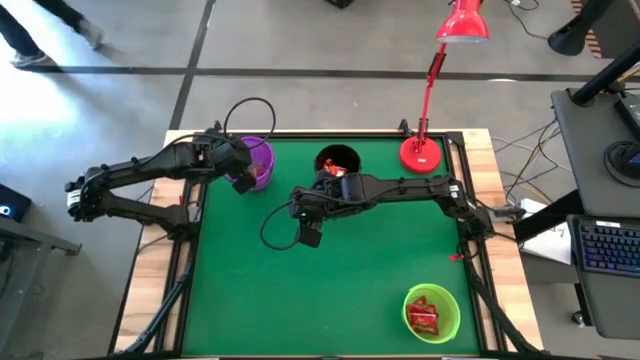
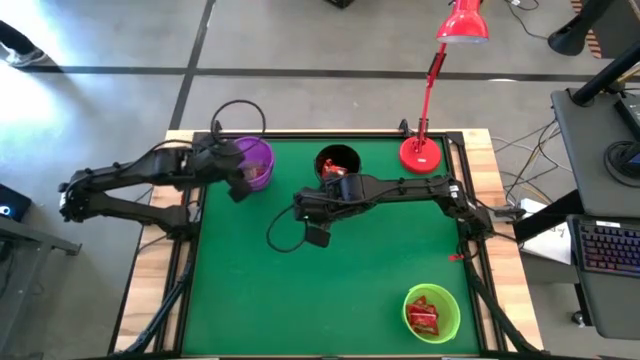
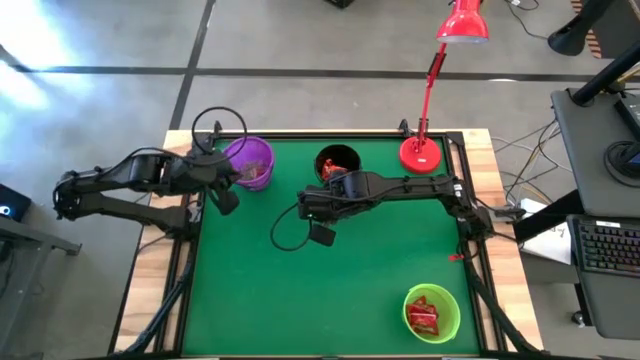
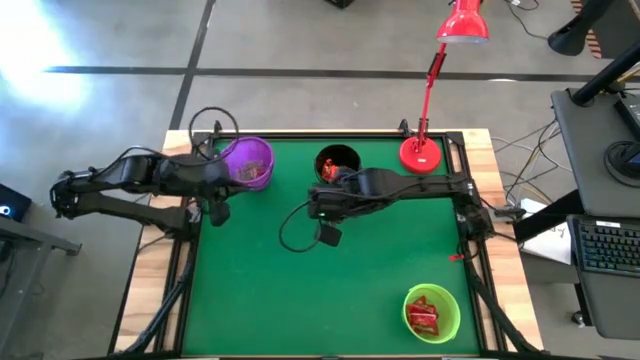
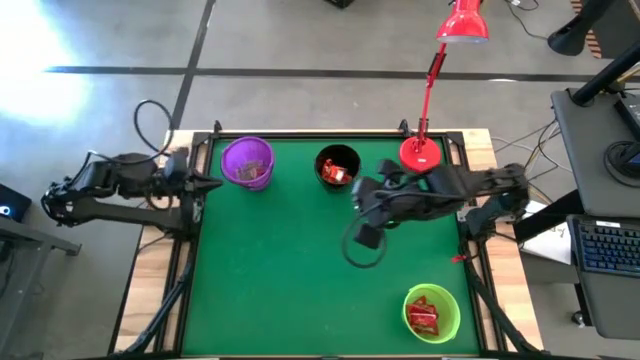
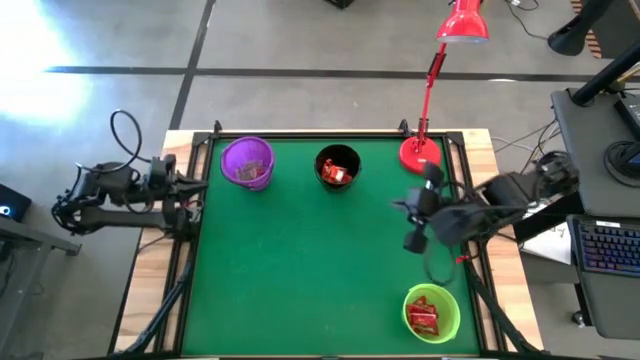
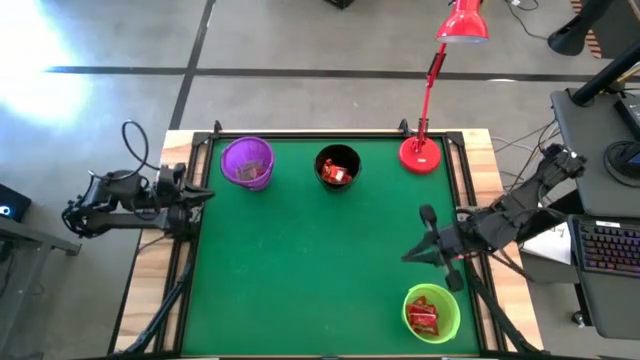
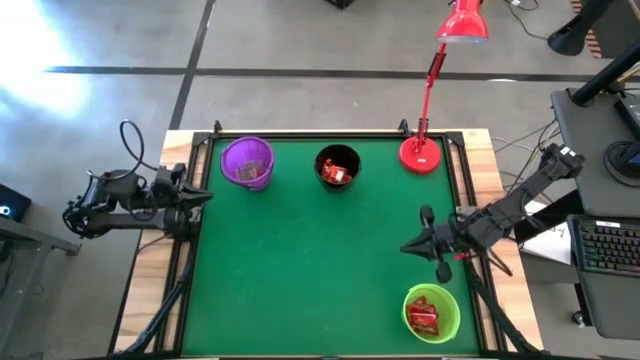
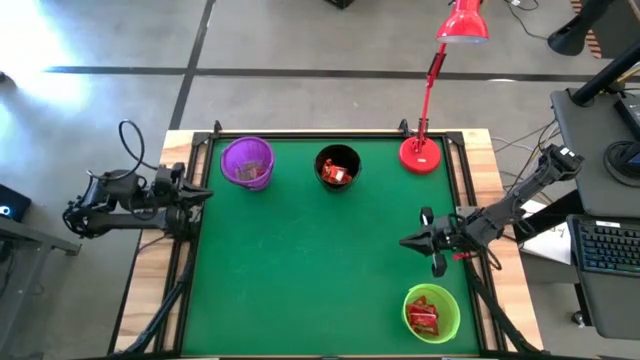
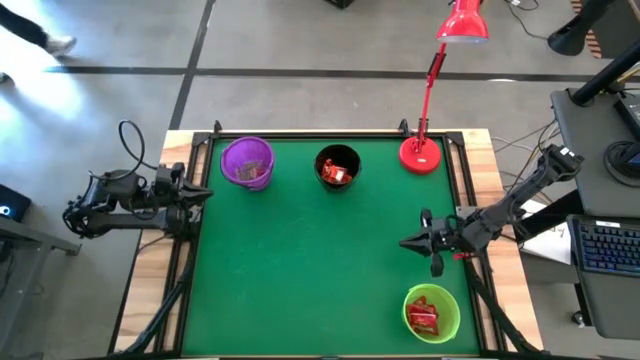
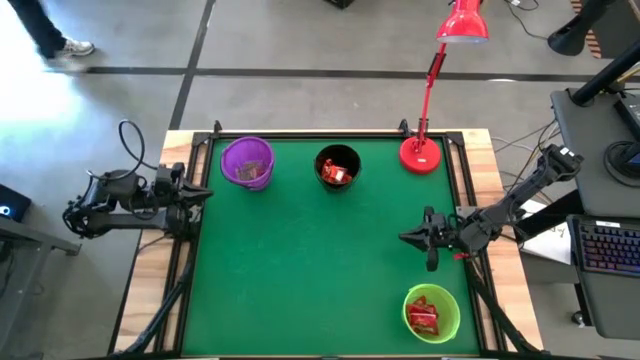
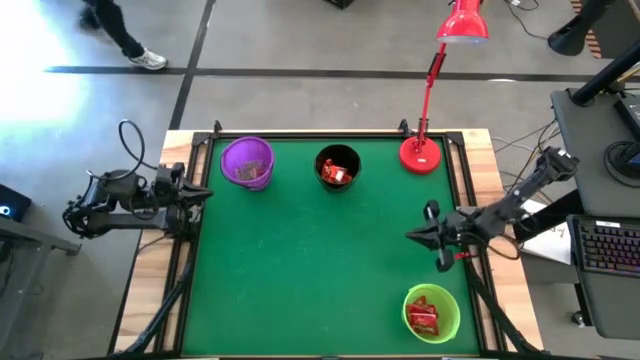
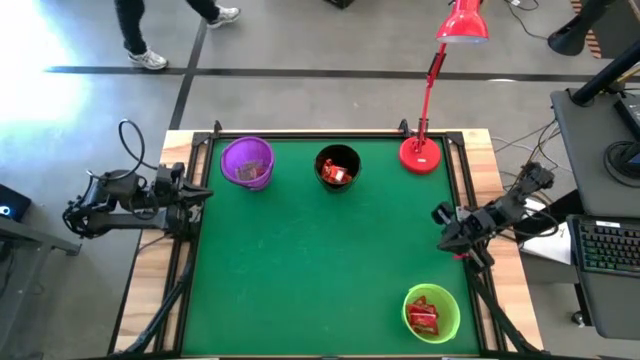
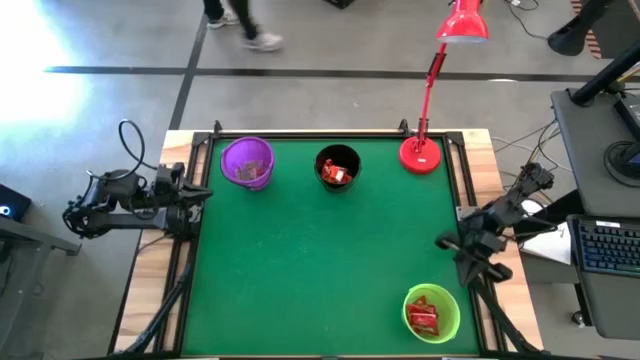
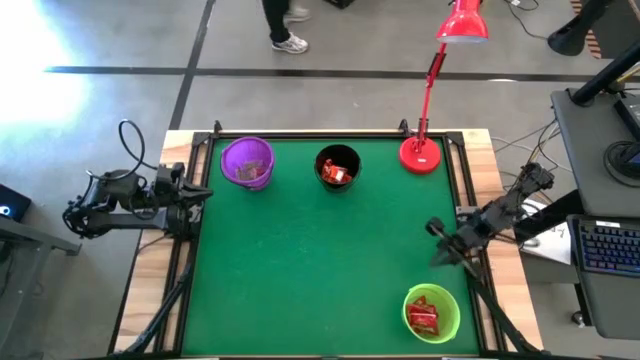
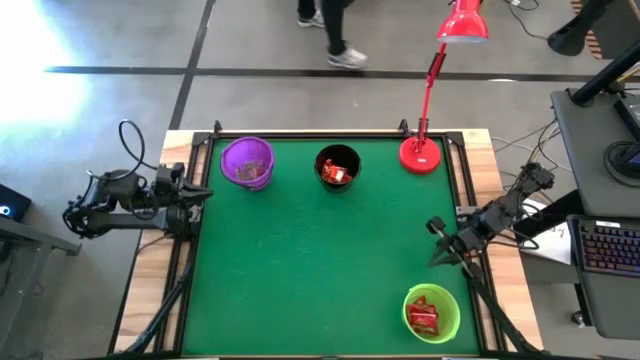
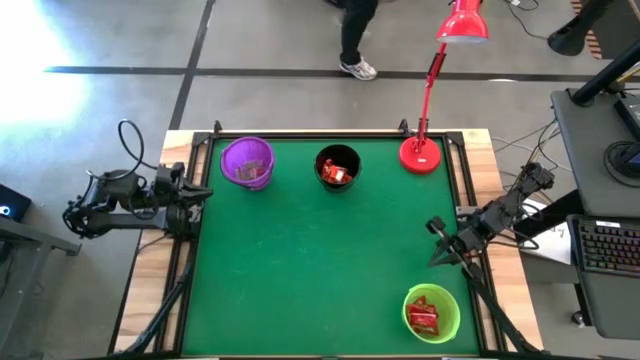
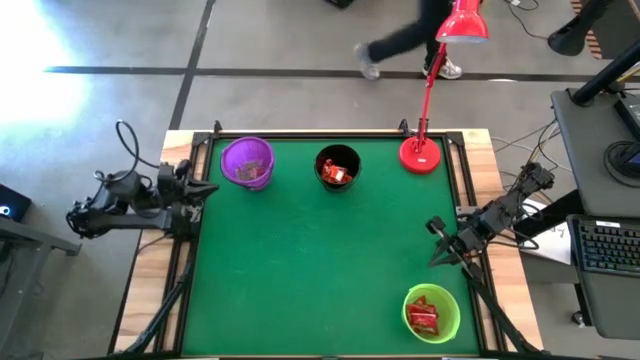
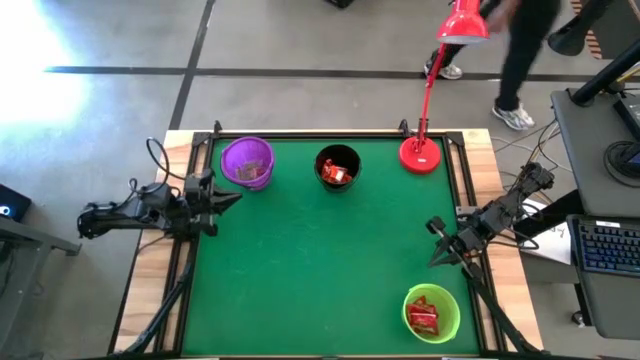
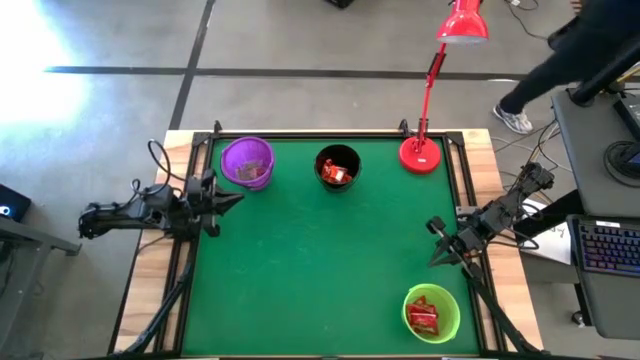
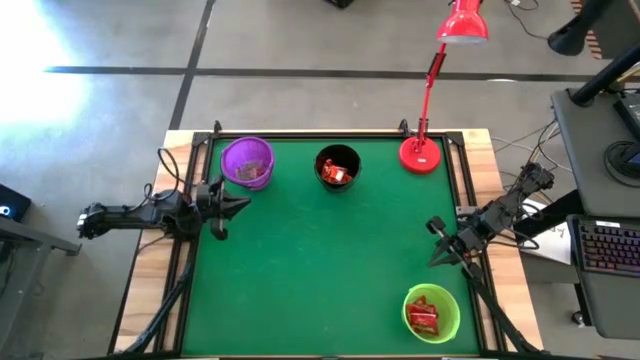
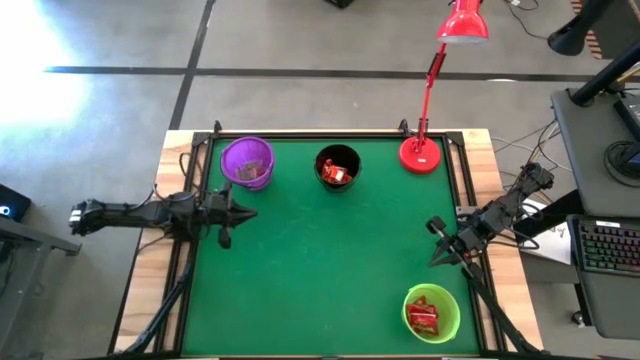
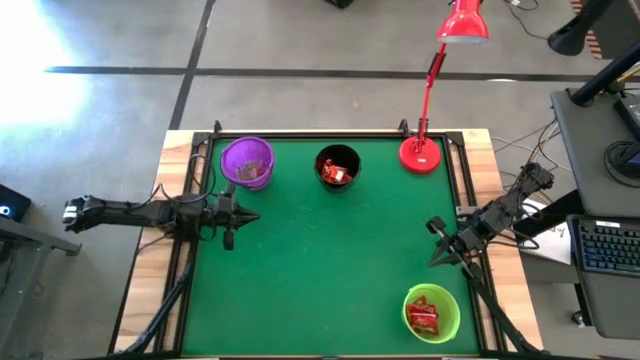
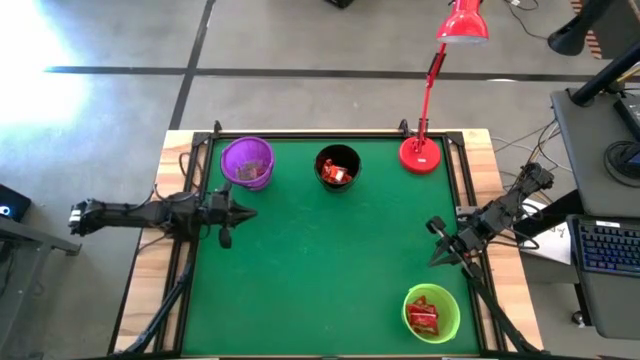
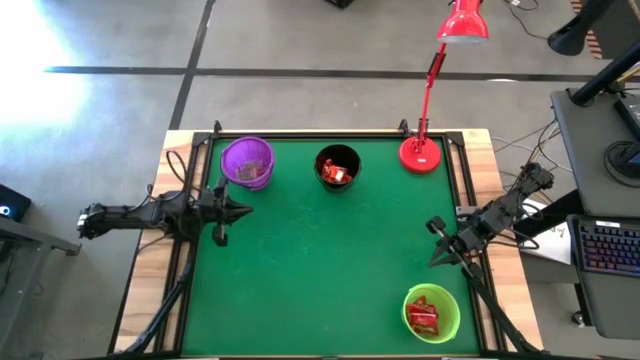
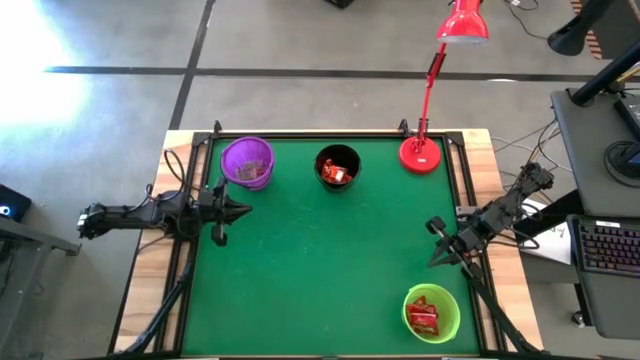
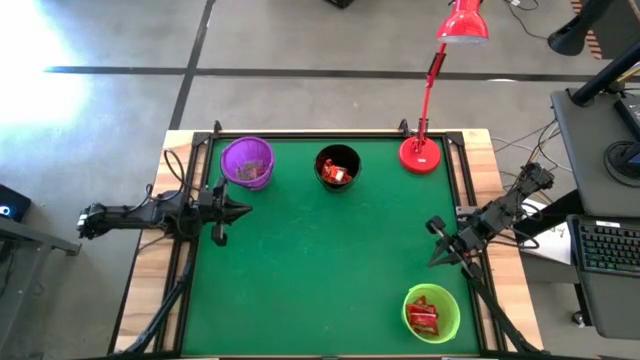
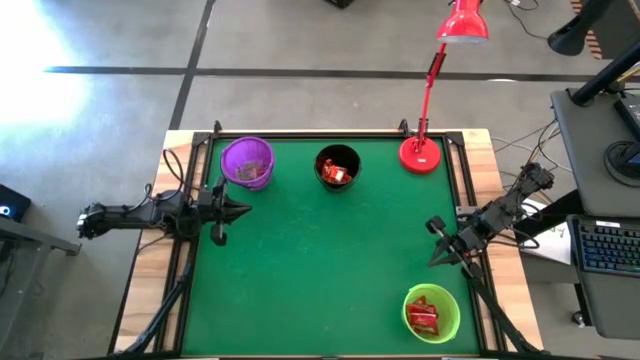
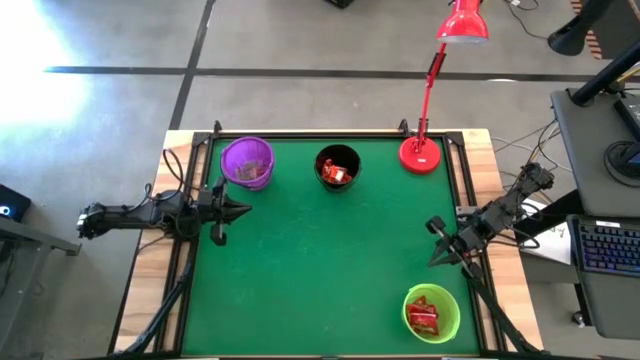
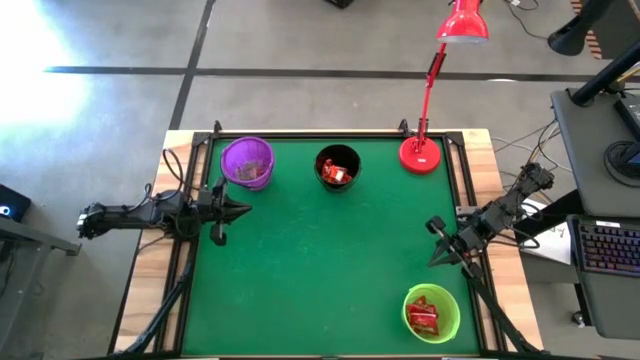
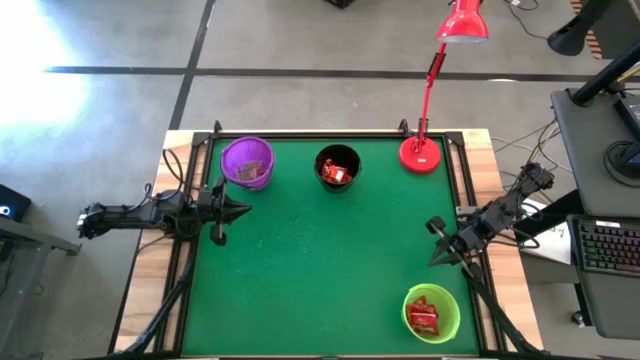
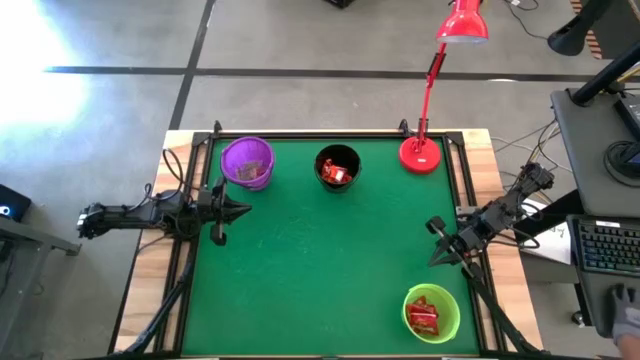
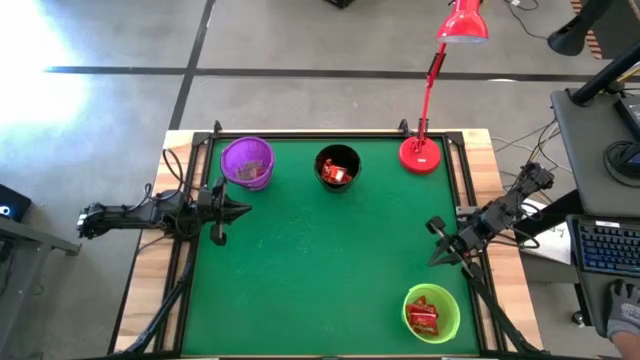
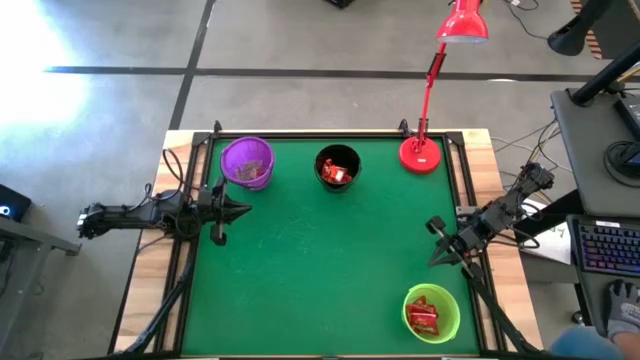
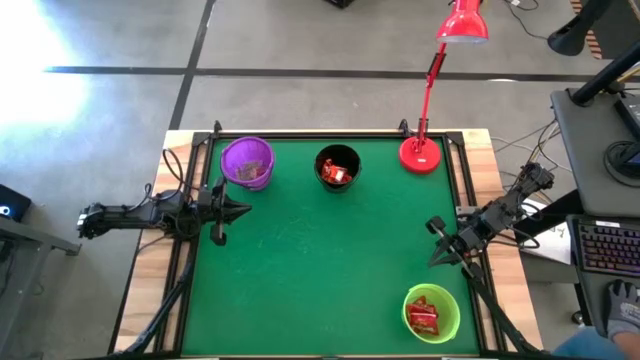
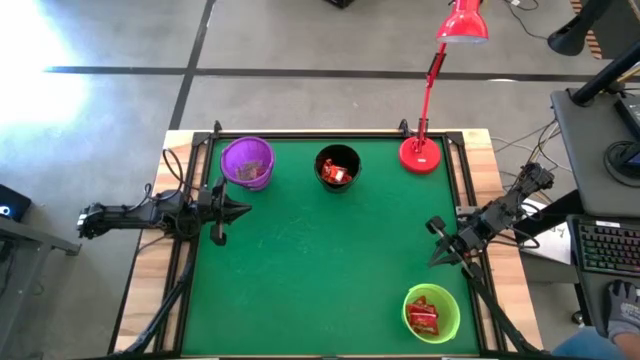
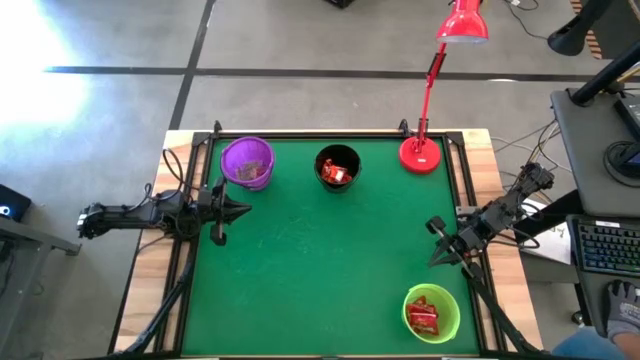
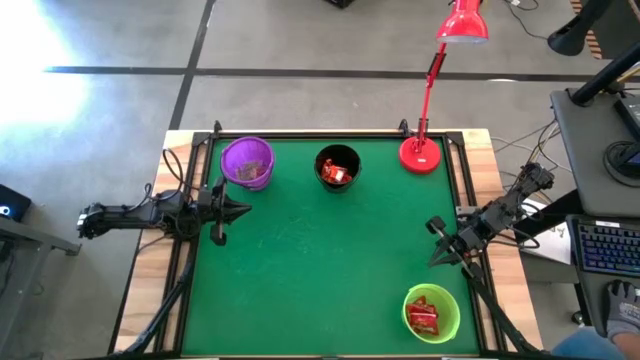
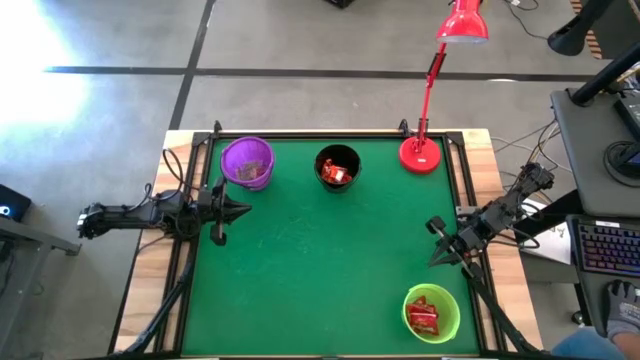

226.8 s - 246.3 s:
Task: Sort candy
Return to Home Position

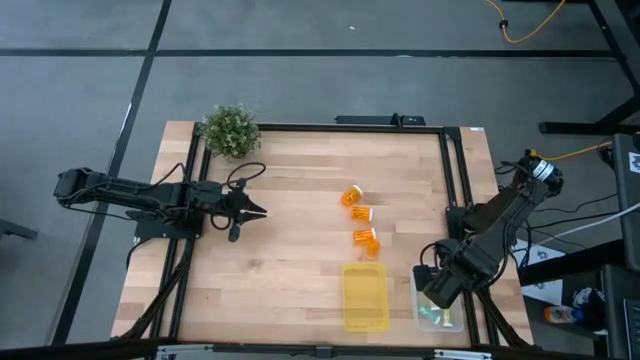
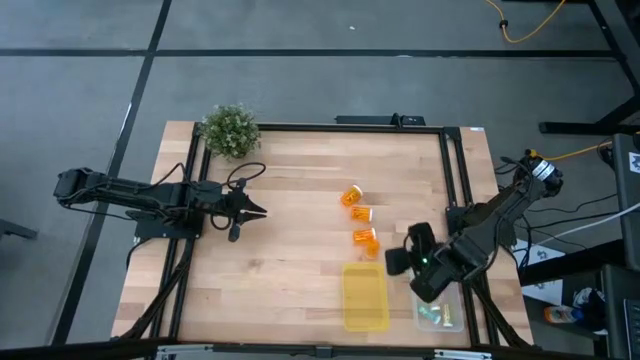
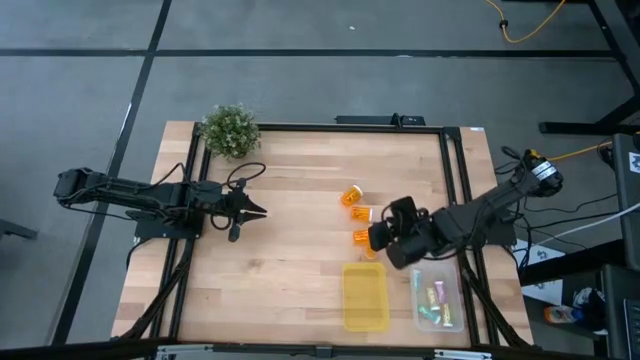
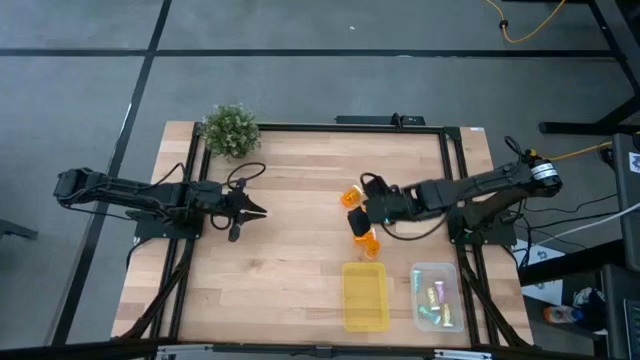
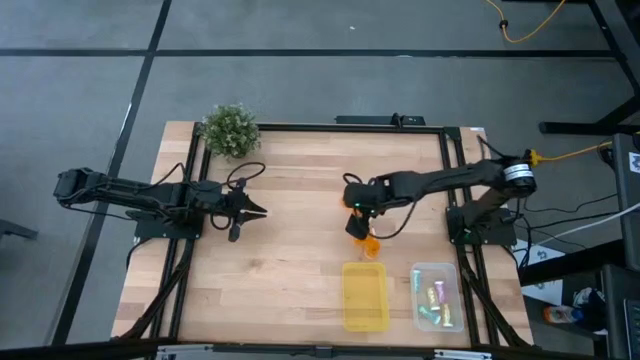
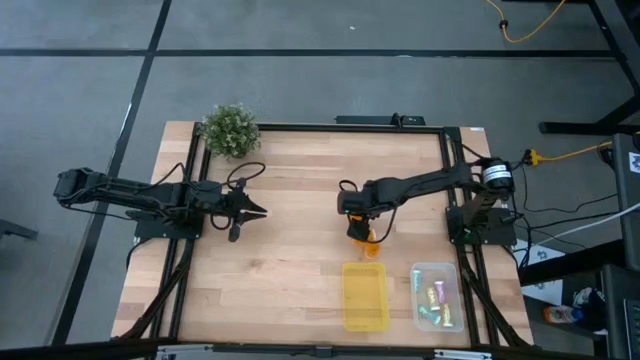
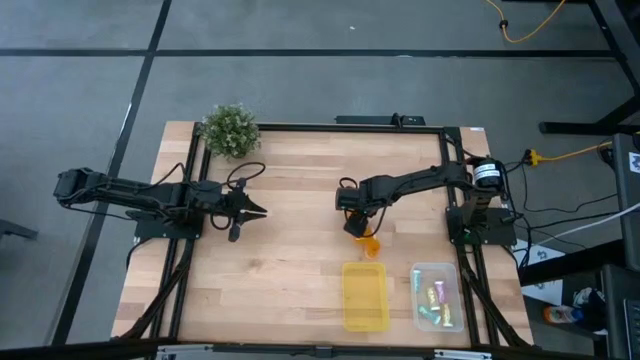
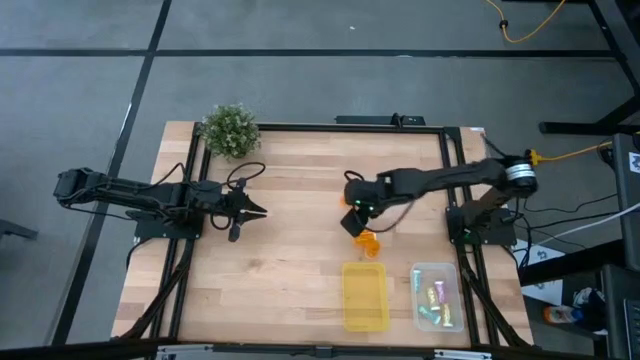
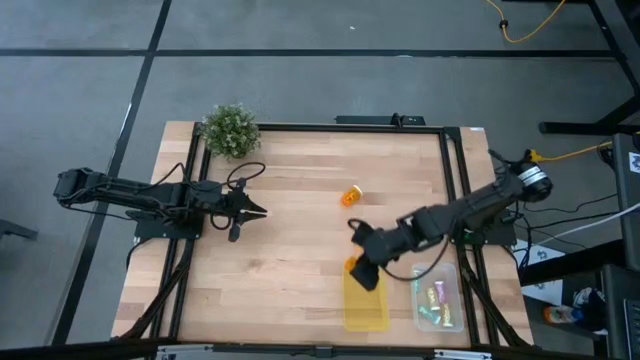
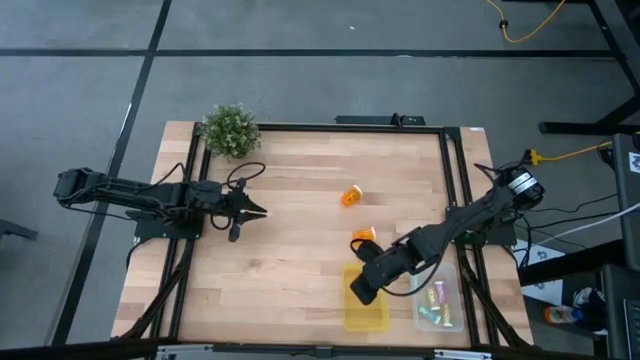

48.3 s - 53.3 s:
Task: Pick and place medicine bottles into bin by pill shape (circle, oval)
Put the orange capsule bottle into the yellow bin
